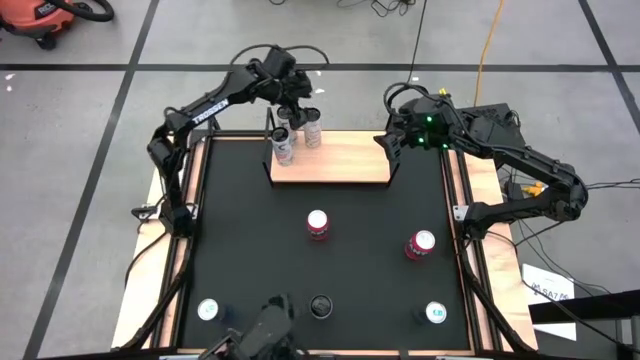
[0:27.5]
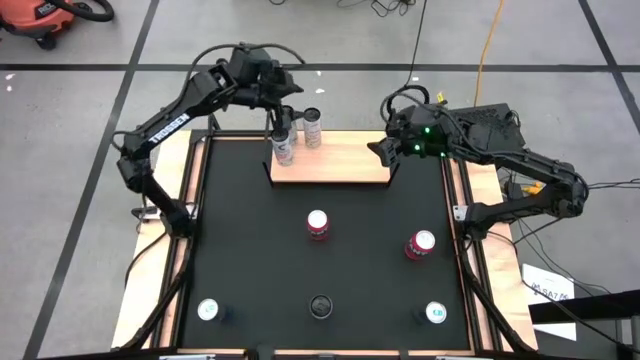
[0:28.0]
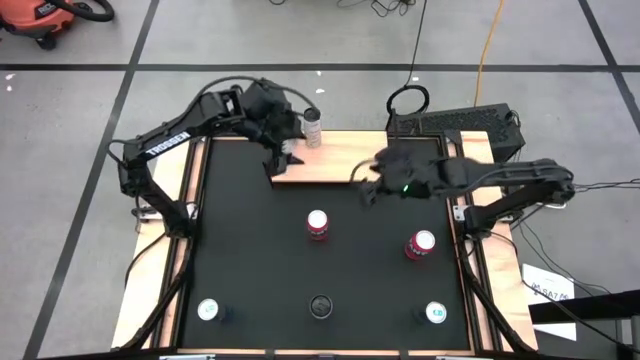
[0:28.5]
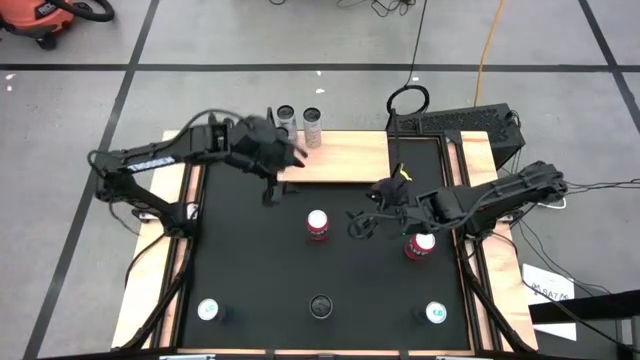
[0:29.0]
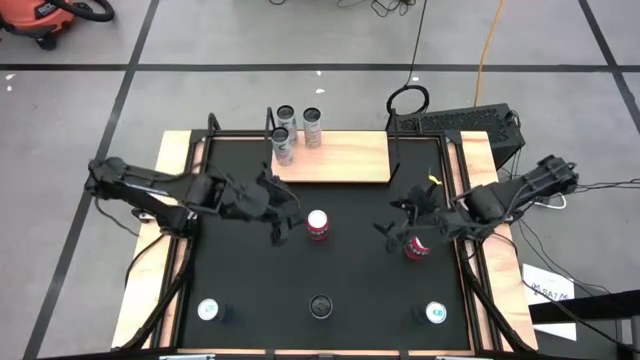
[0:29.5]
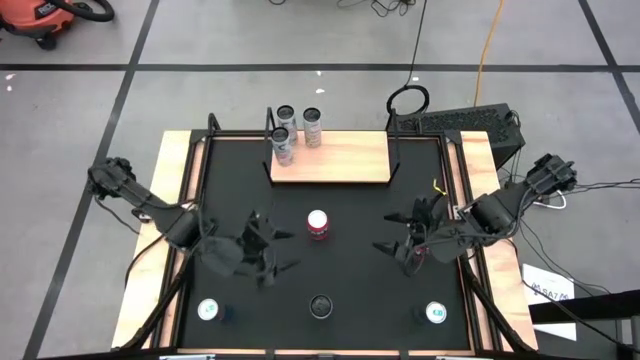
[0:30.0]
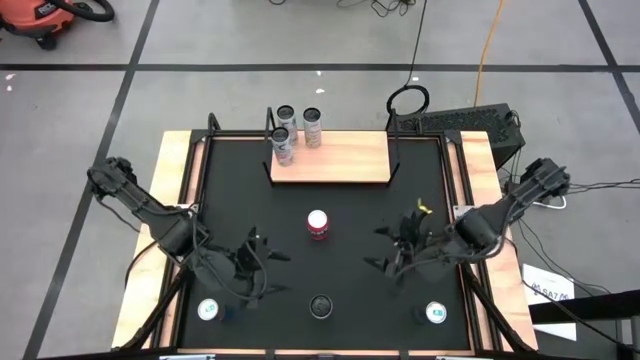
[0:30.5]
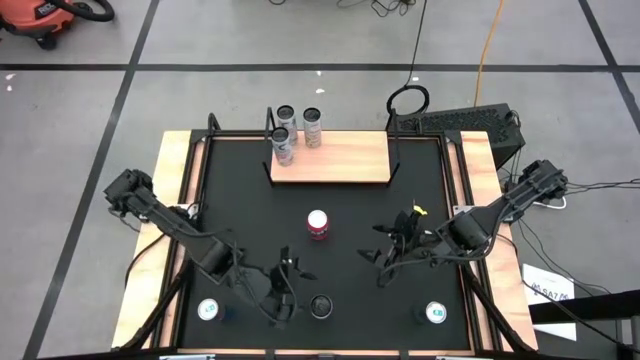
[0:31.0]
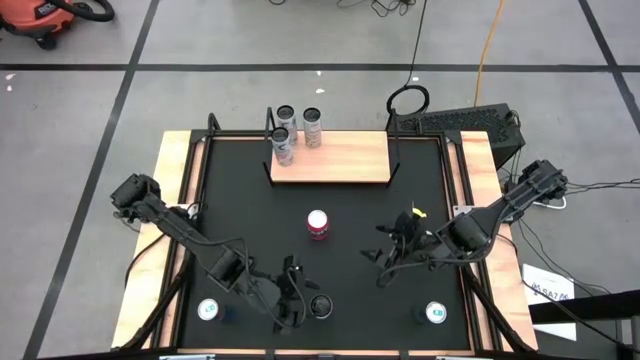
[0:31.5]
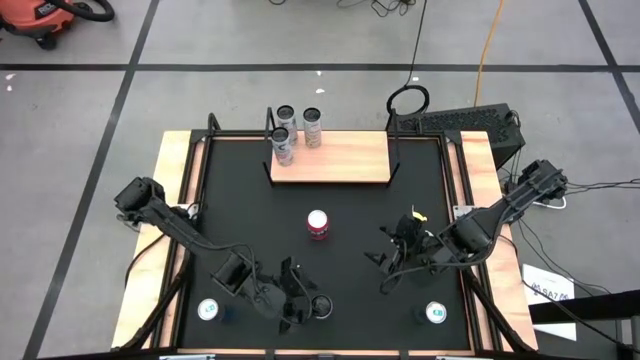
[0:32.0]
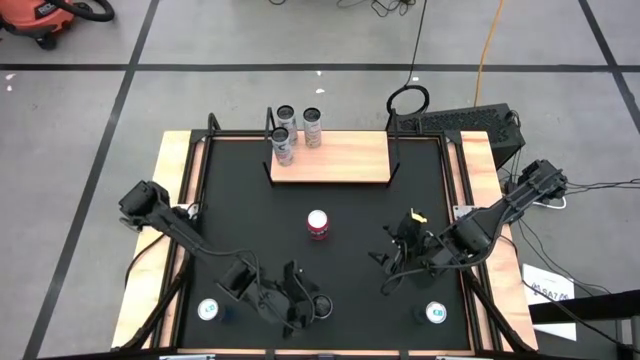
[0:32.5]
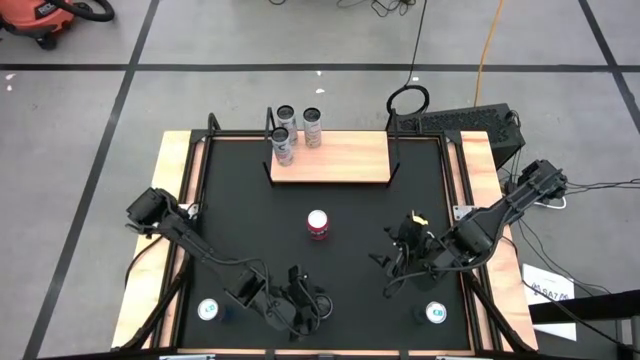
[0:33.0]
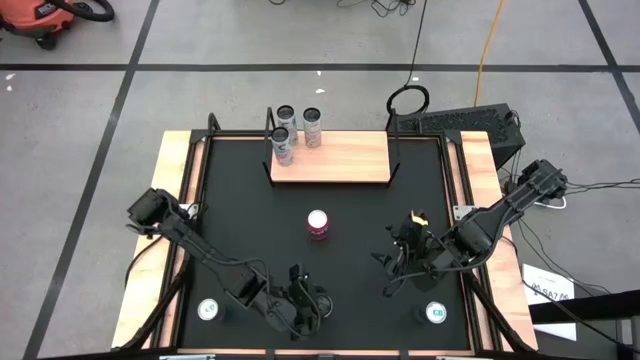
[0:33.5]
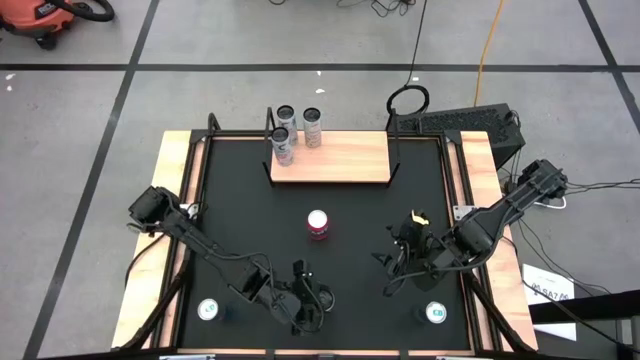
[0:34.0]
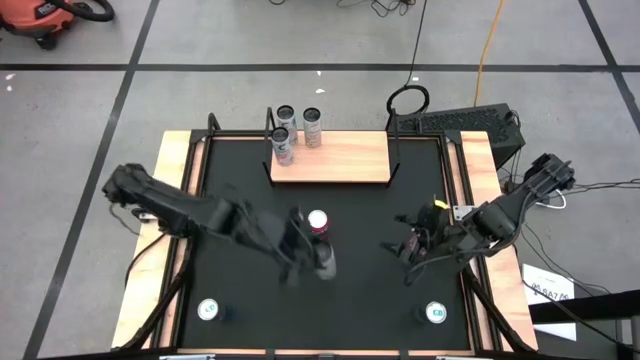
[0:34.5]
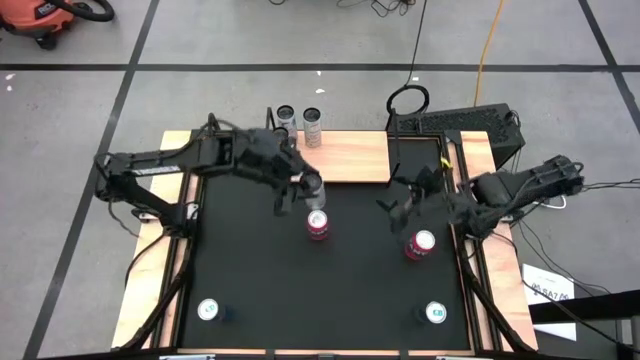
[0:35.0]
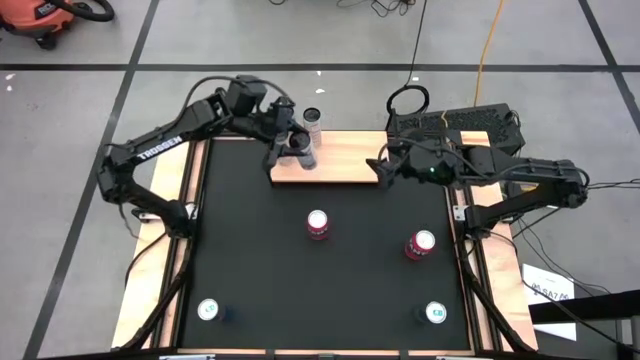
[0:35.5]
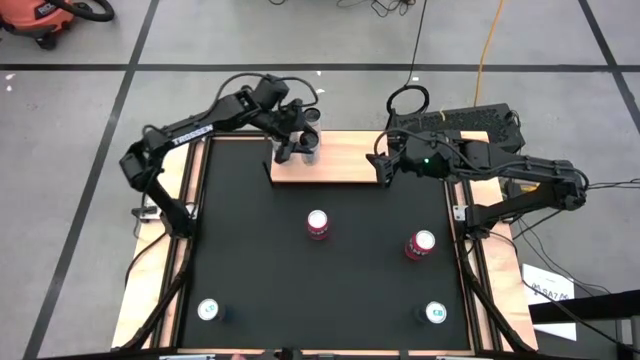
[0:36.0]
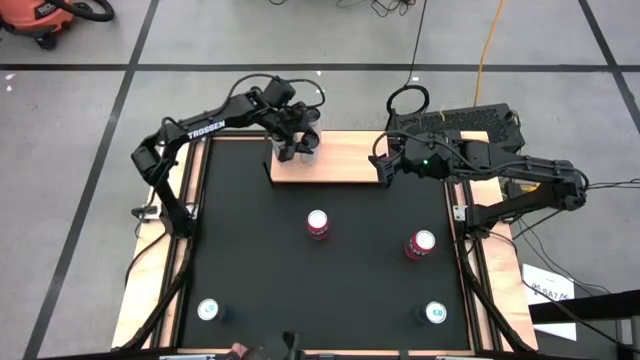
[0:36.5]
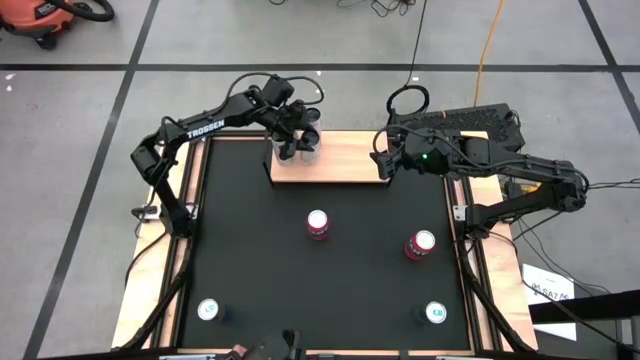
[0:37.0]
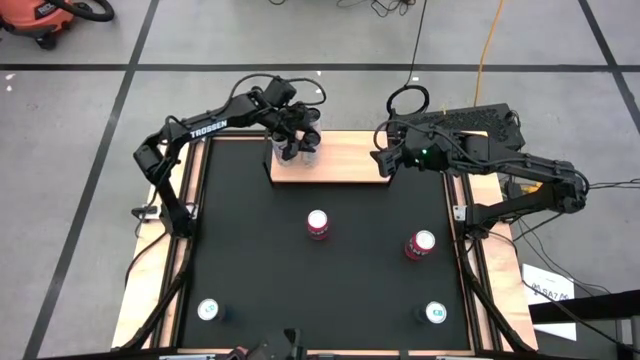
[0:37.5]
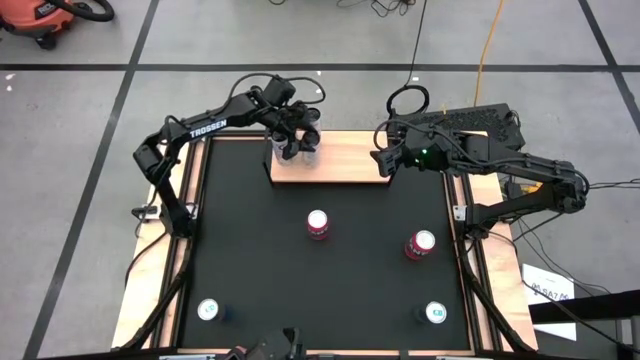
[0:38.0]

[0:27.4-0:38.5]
Task: Place canned beverage on shelf
Put the white yellow soda can on the shelf aligned with the other white yellow soda can on the shelf

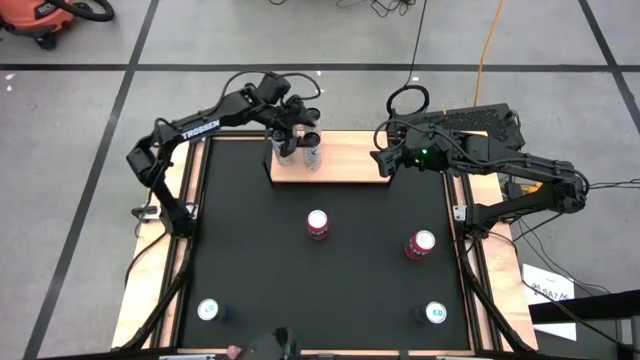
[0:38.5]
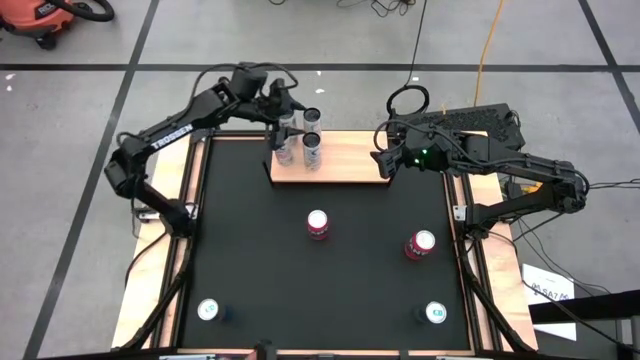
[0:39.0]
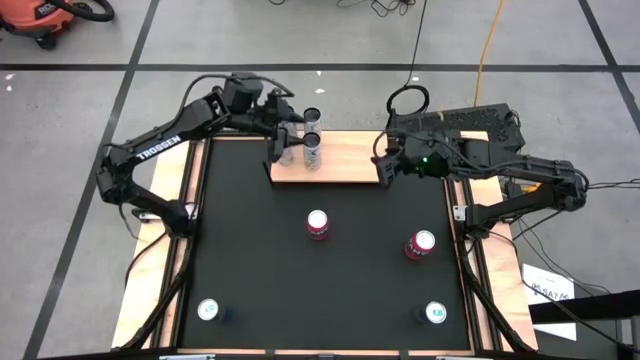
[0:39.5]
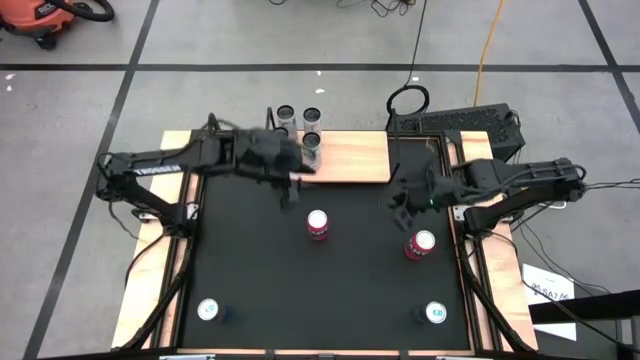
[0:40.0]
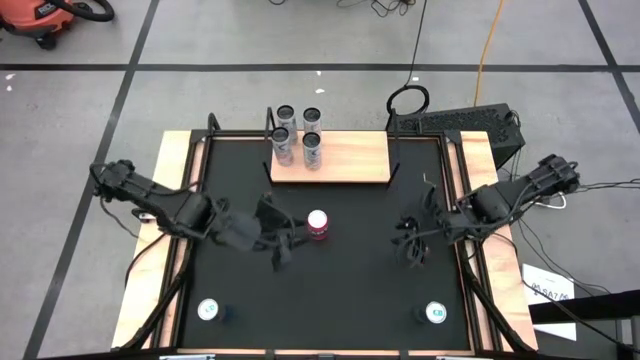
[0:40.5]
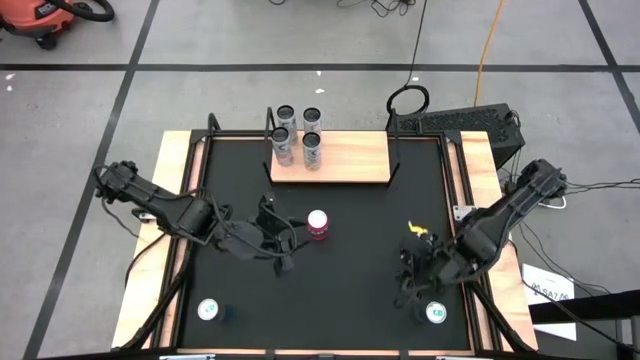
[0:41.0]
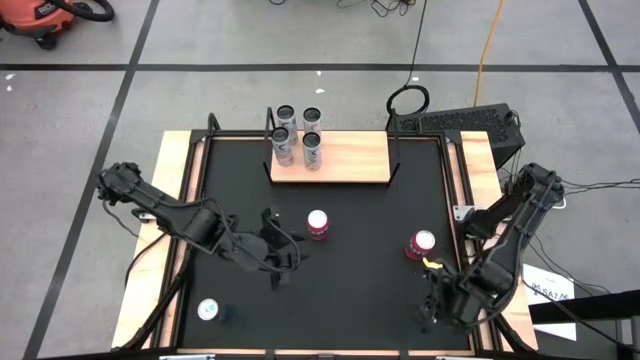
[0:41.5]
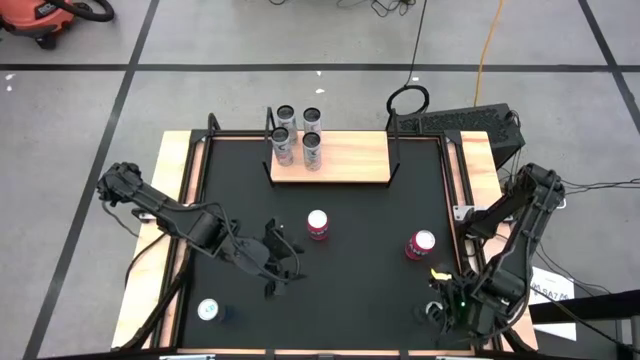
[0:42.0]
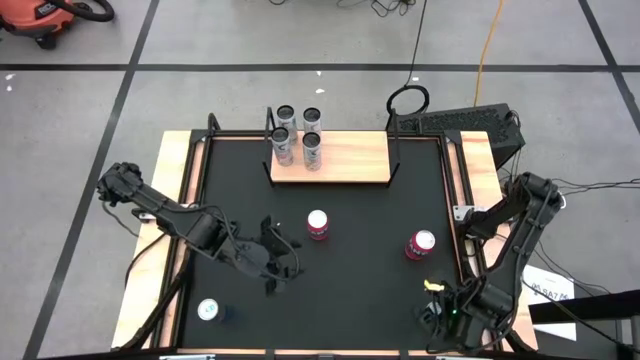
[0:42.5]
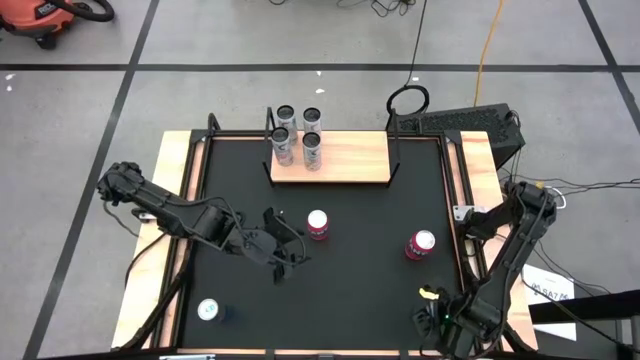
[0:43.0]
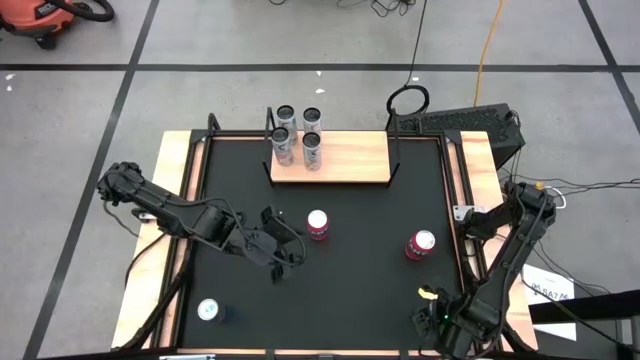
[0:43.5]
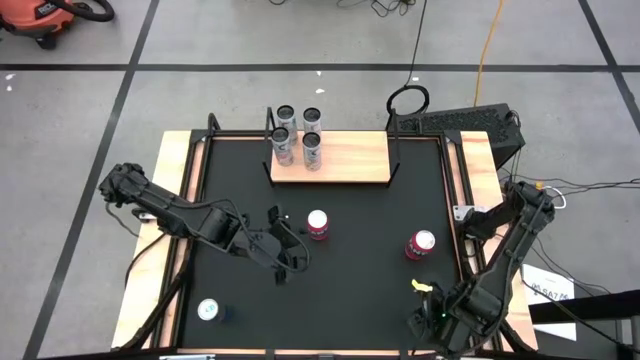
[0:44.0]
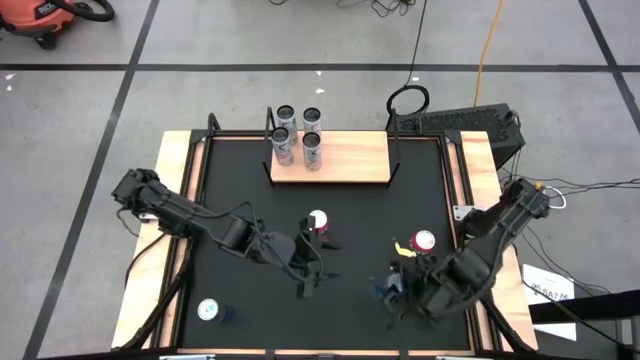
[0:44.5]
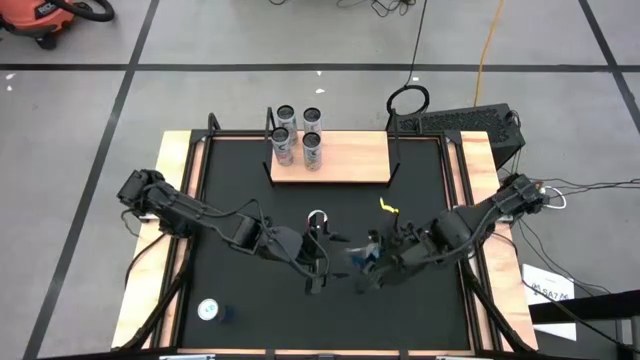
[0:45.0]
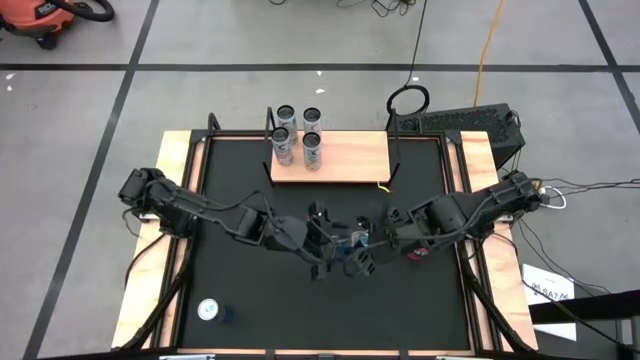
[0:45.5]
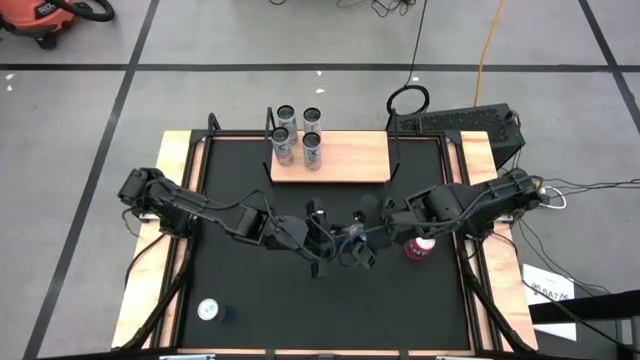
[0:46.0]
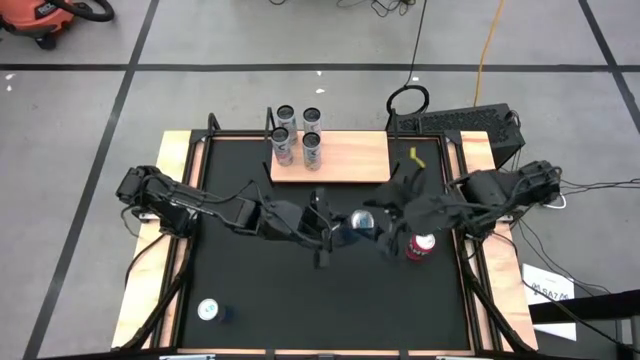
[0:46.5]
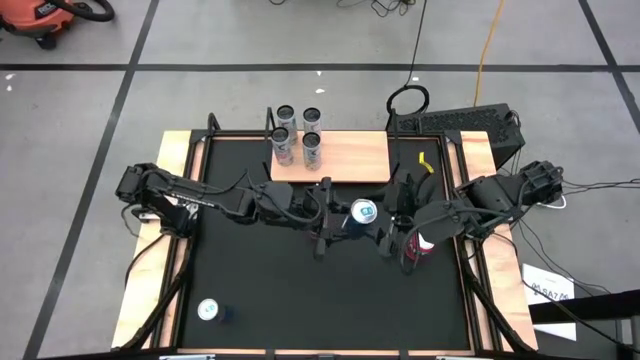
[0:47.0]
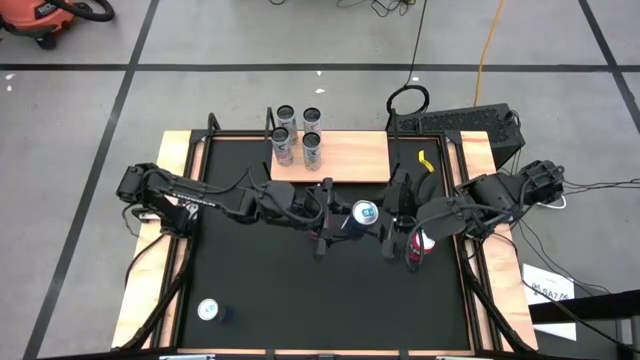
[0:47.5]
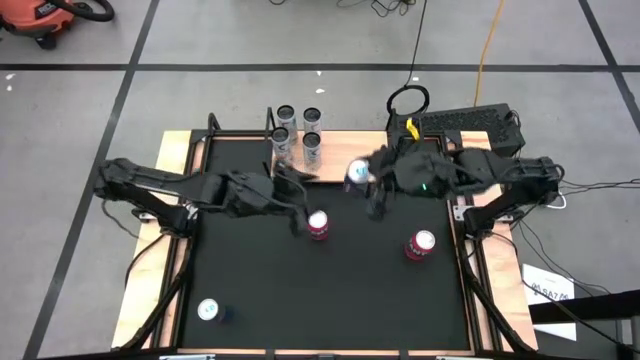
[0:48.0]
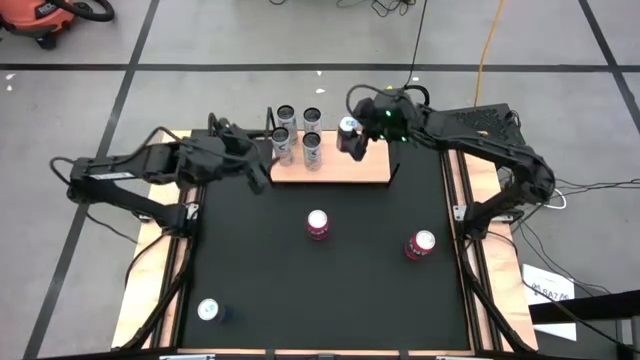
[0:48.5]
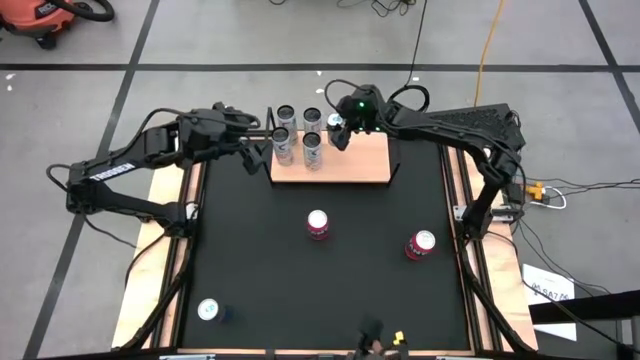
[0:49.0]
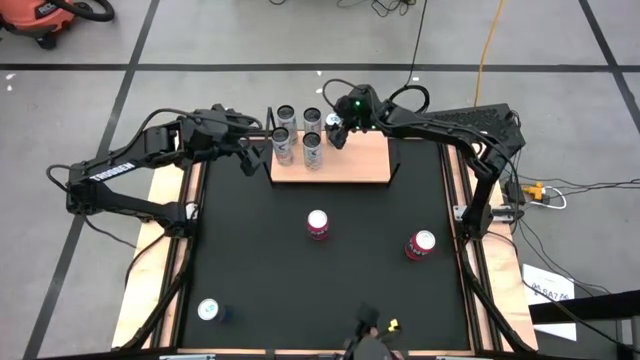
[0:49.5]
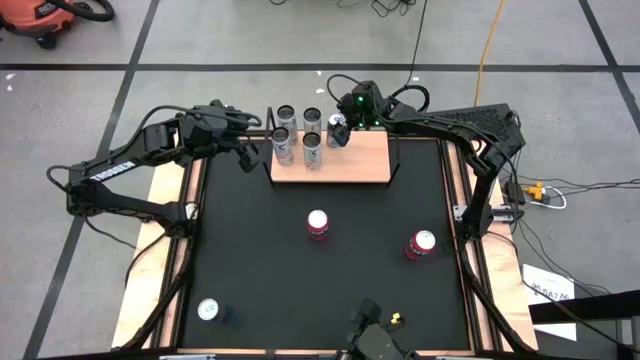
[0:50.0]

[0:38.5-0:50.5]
Put the right blue soda can on the shelf
